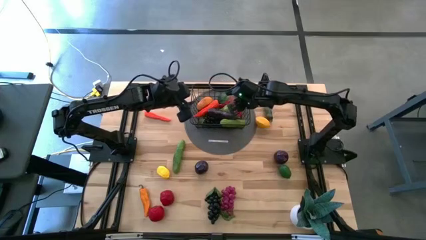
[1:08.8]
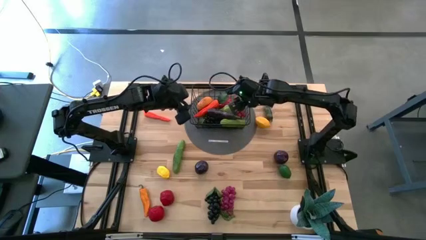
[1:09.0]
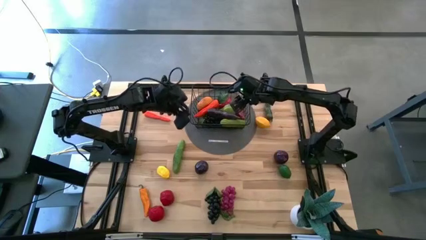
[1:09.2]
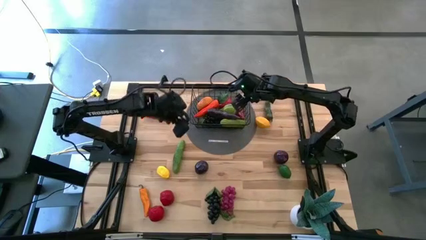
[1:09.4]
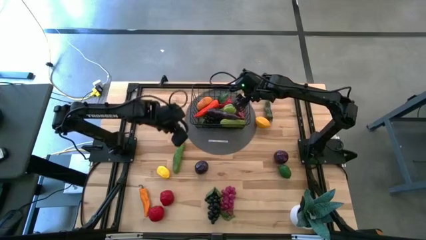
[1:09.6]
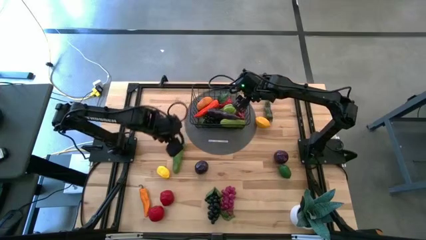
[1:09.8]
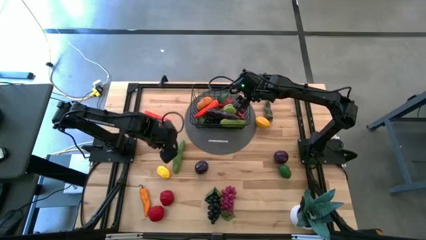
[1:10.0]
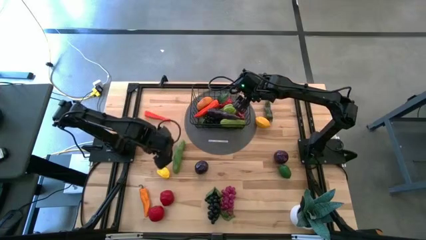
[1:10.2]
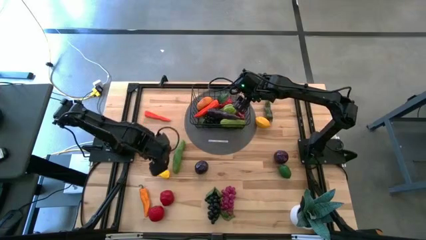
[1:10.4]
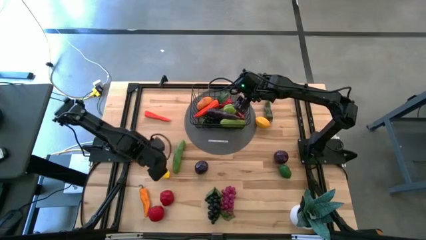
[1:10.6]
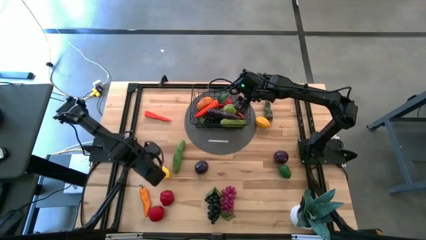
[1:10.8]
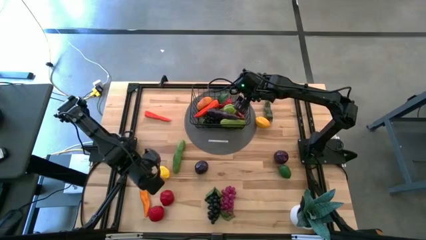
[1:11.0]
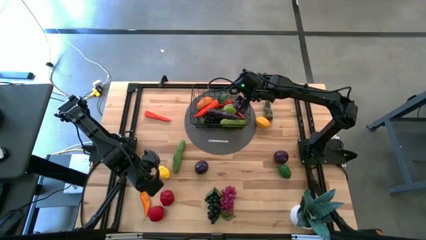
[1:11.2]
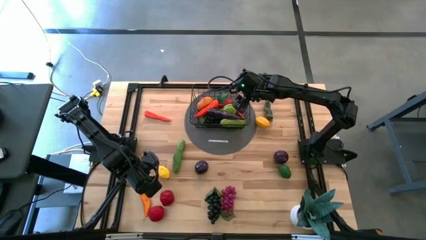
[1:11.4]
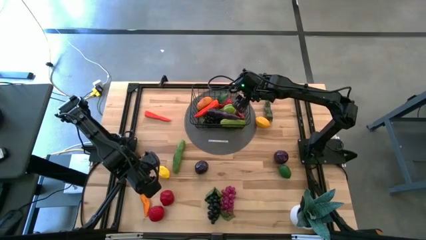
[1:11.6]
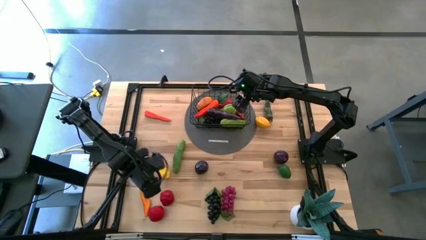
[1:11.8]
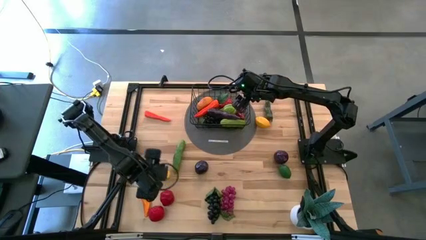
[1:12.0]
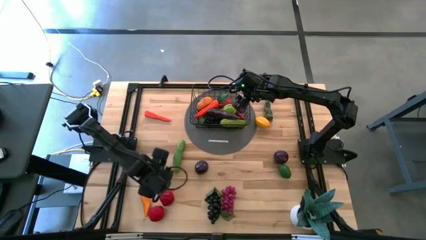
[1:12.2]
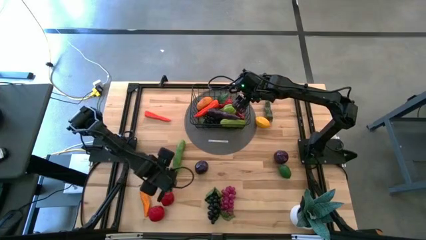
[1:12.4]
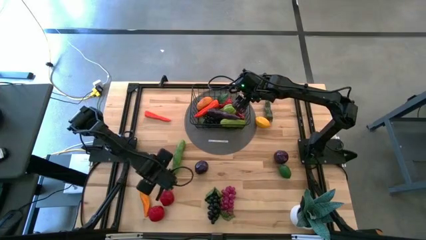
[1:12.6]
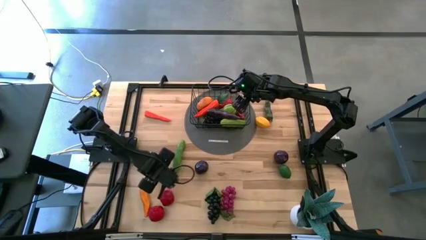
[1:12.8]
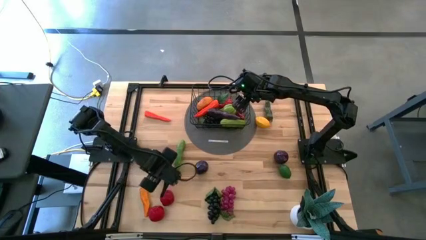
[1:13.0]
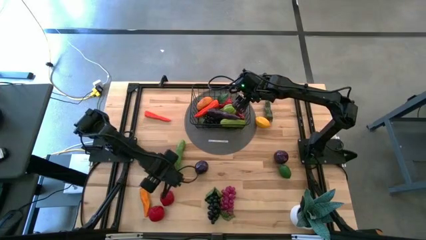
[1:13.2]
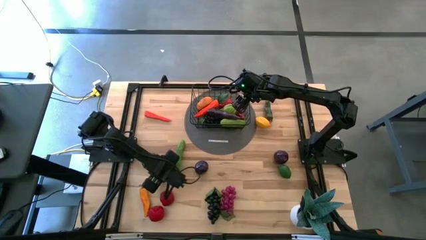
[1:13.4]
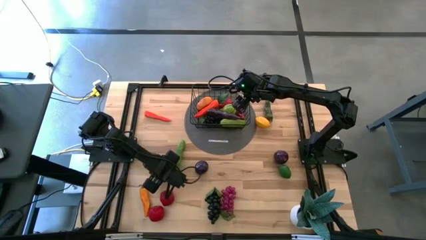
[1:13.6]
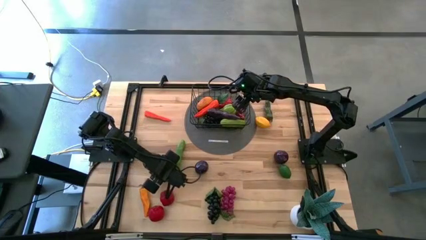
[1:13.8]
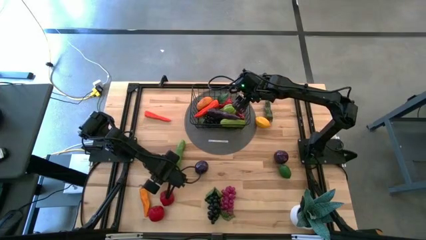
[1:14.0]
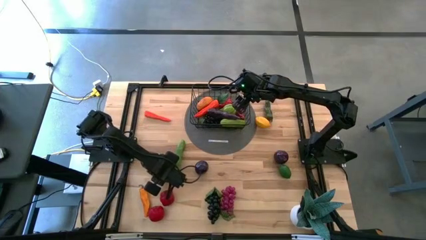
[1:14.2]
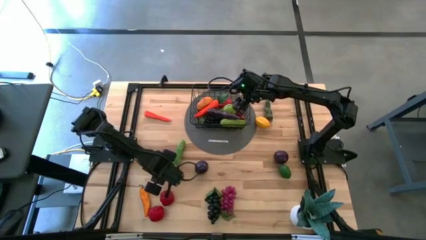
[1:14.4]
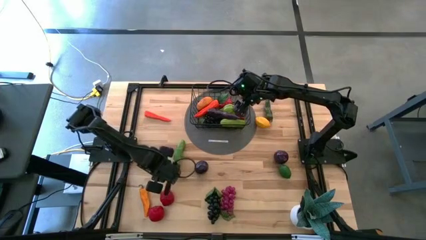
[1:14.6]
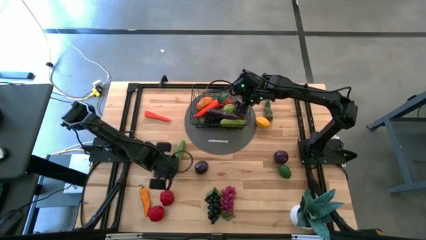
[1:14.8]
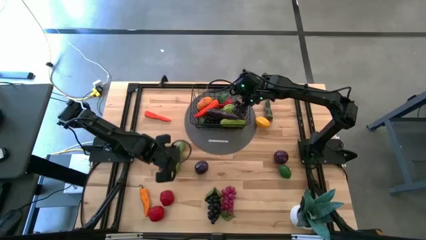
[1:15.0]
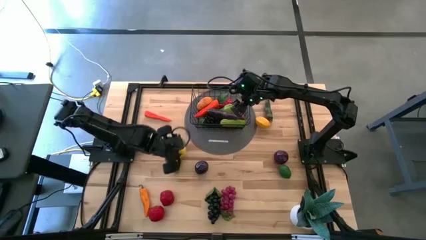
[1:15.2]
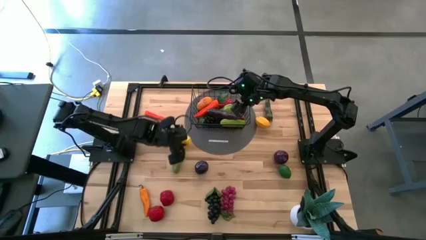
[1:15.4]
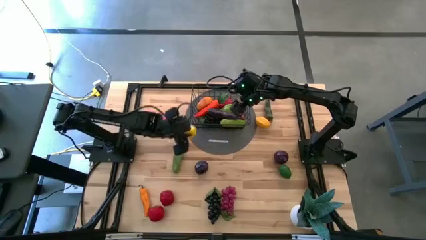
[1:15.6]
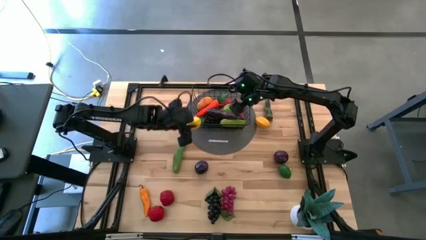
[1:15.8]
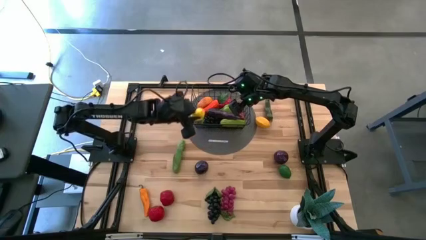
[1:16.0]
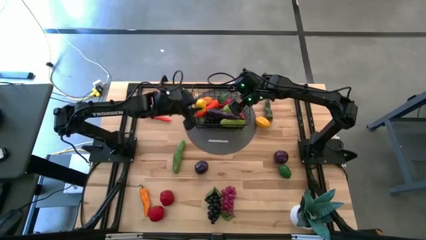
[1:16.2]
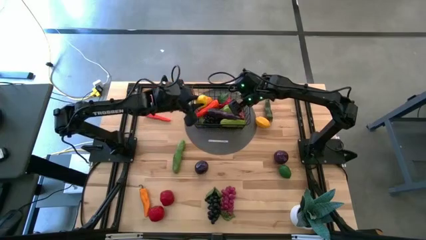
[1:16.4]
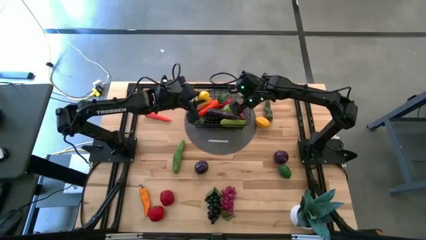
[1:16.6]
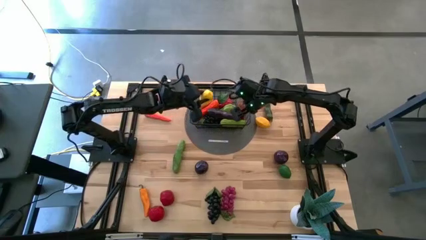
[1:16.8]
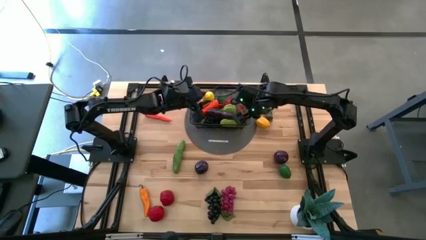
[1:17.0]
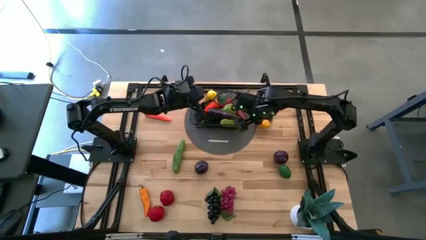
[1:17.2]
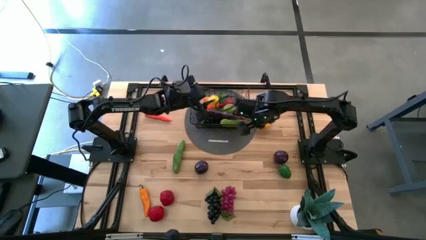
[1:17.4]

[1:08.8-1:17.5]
Task: Build produce basket
Put the left yellow lemon into the black wire basket

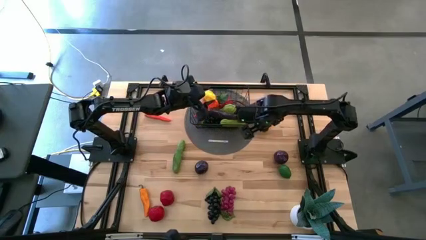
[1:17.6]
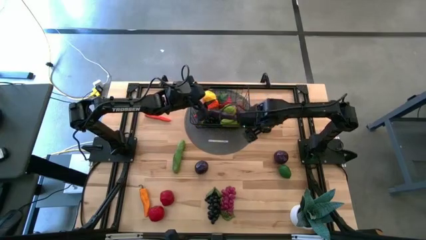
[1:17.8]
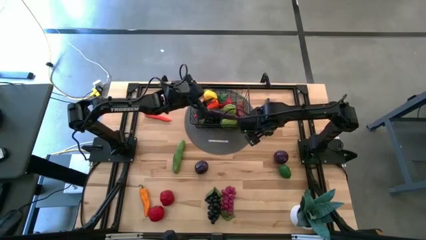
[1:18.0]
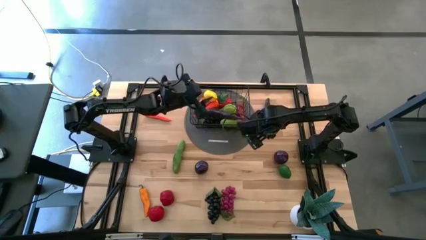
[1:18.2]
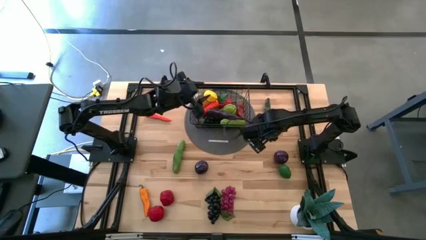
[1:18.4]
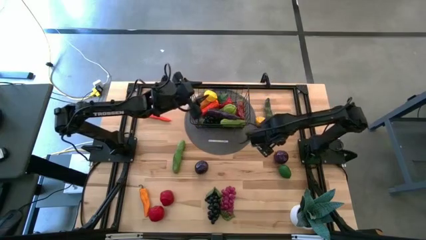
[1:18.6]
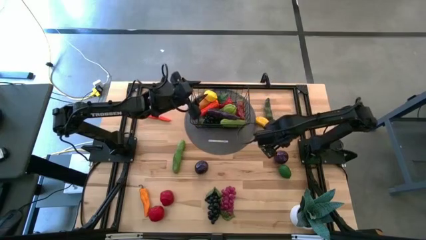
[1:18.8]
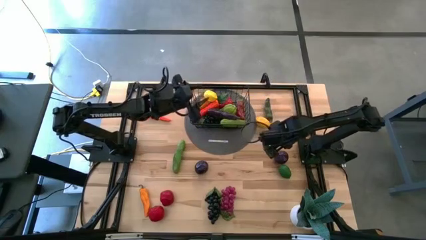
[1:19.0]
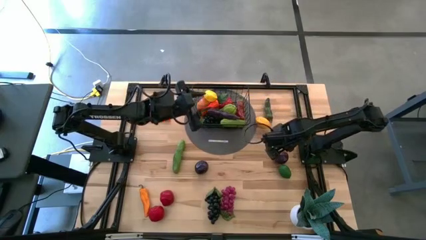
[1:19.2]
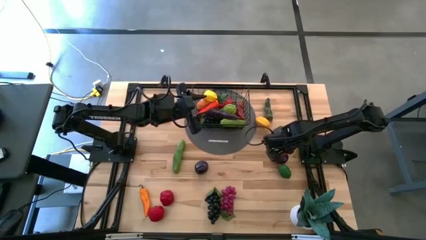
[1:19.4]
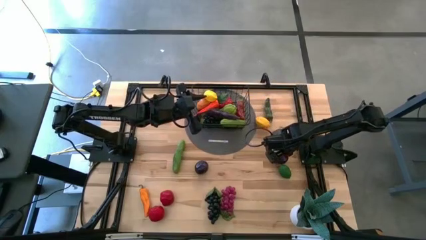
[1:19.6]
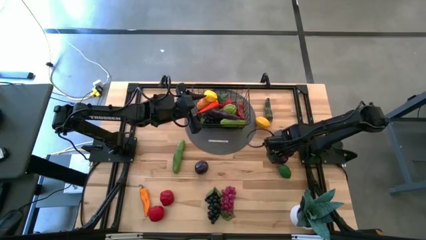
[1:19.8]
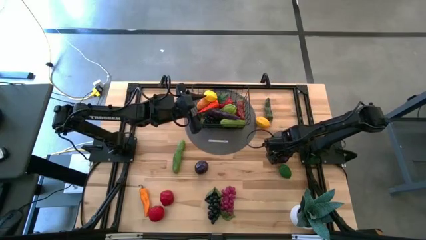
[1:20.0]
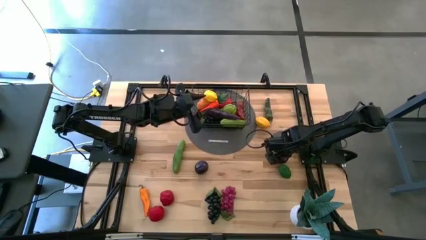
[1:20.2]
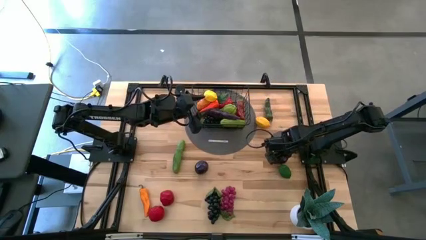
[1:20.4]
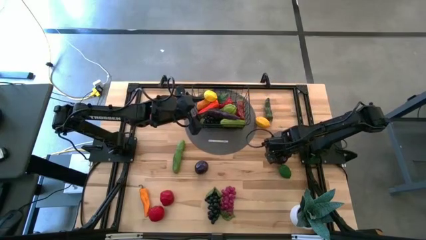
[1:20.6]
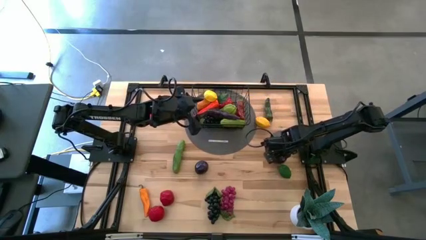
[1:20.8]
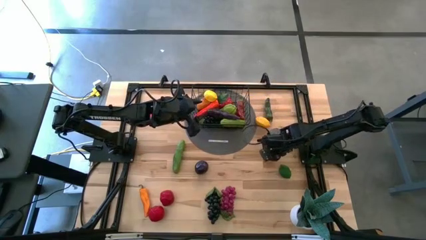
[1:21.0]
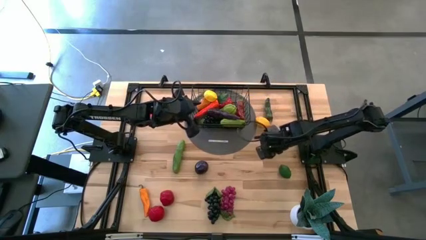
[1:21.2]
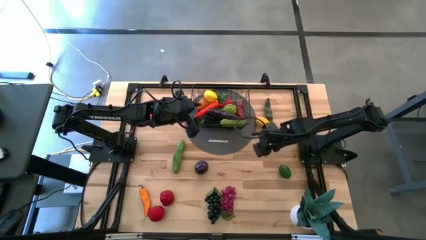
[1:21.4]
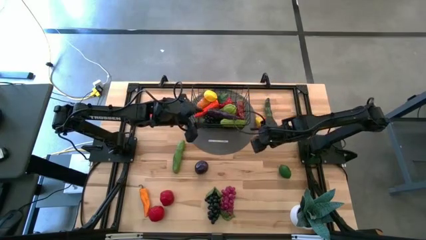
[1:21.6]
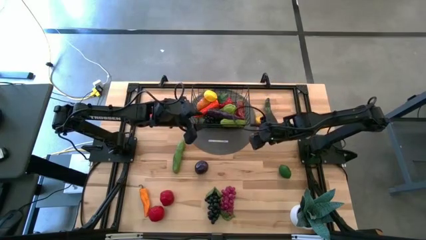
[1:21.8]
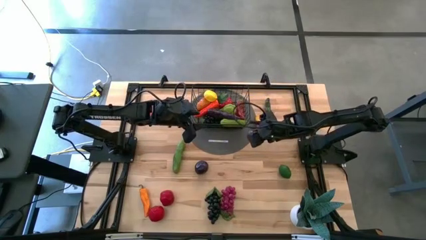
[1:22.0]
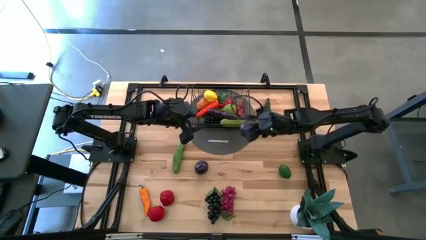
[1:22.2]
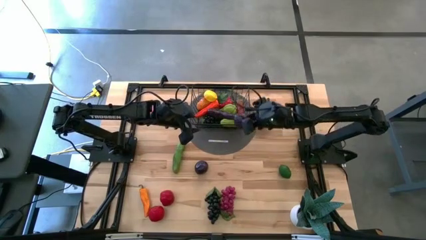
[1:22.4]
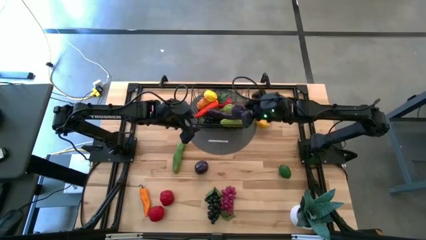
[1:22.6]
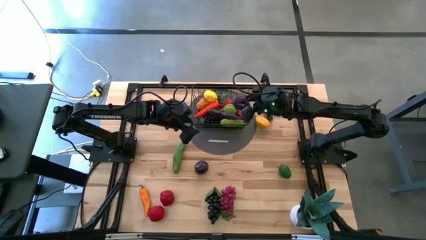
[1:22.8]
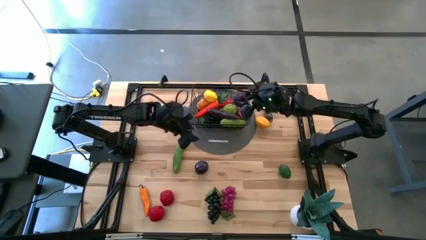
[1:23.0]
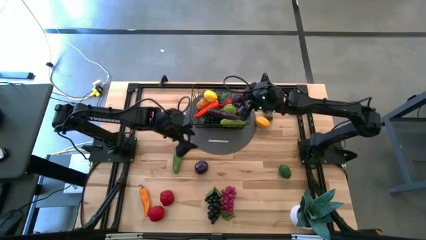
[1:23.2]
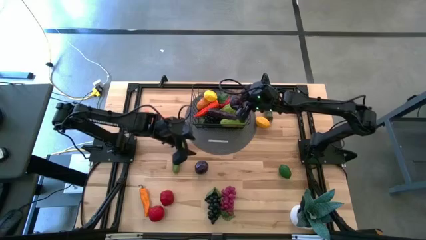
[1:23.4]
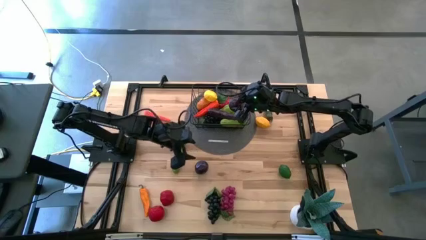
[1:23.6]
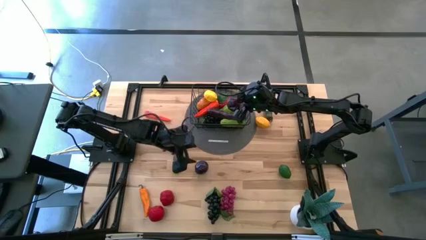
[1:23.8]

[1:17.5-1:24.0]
Put the right purple plum into the black wire basket

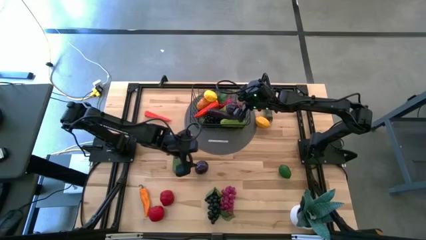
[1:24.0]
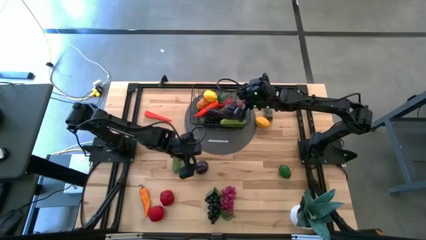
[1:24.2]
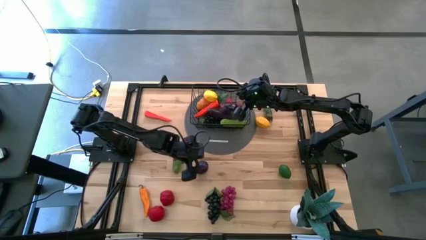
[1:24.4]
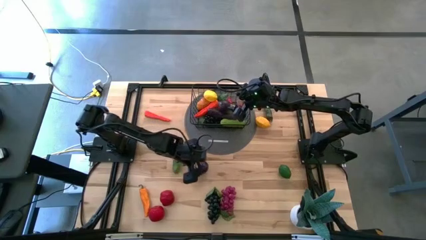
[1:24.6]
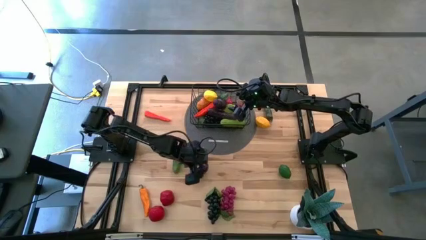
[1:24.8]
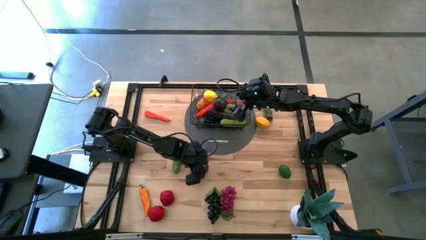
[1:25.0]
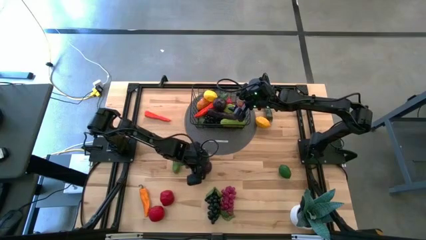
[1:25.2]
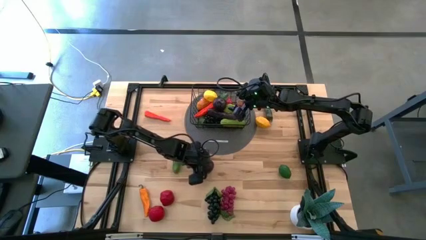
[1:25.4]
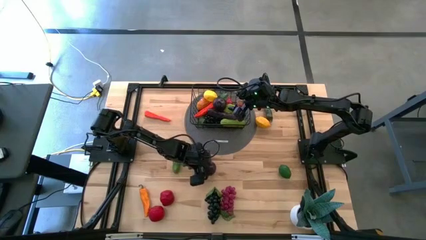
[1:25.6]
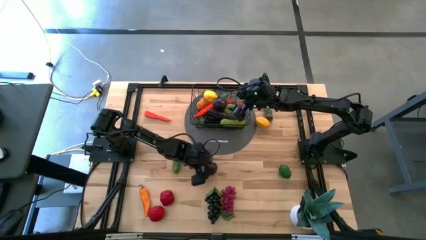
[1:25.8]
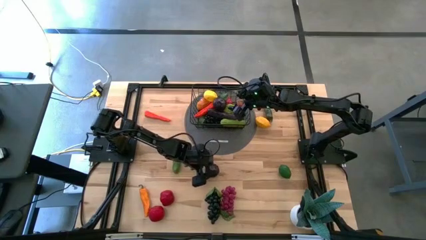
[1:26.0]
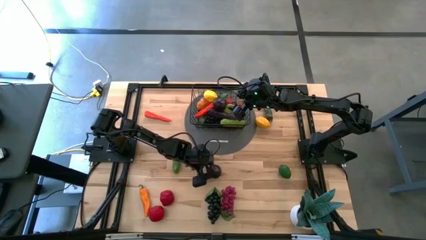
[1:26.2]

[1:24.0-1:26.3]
Put the purple plum into the black wire basket
